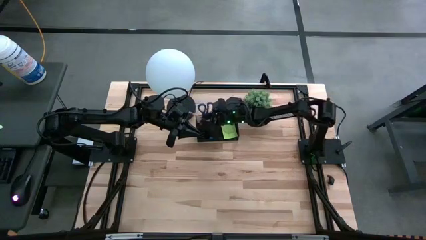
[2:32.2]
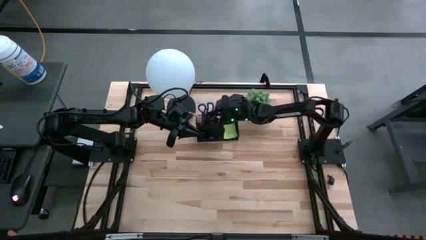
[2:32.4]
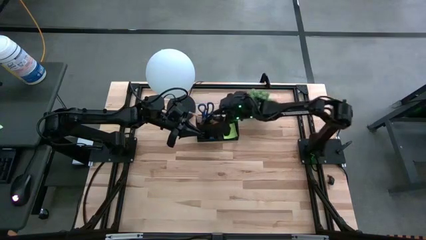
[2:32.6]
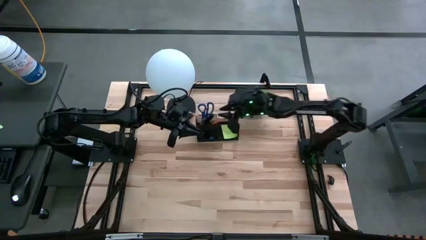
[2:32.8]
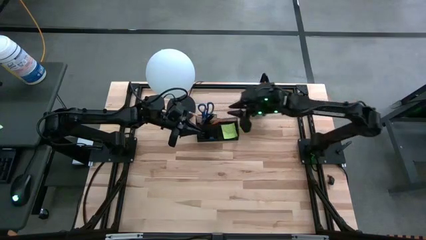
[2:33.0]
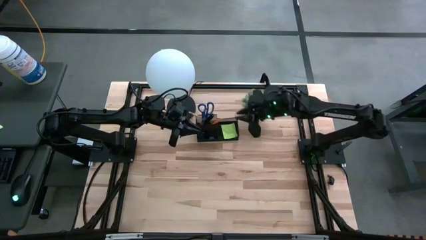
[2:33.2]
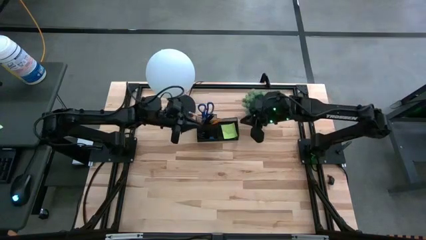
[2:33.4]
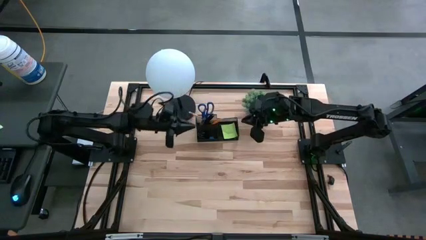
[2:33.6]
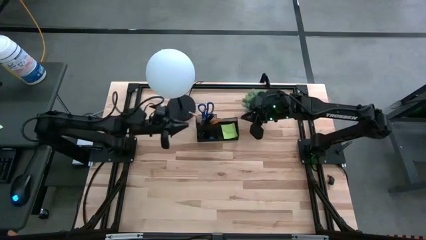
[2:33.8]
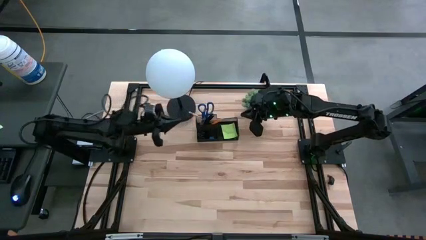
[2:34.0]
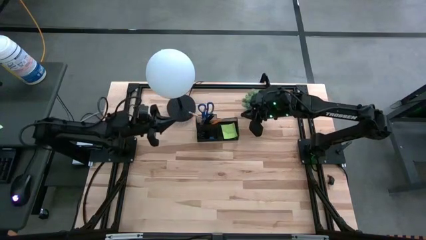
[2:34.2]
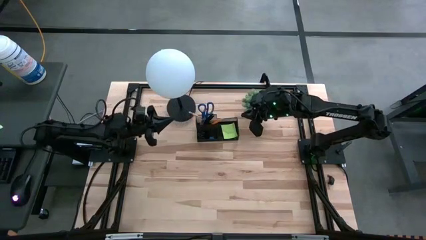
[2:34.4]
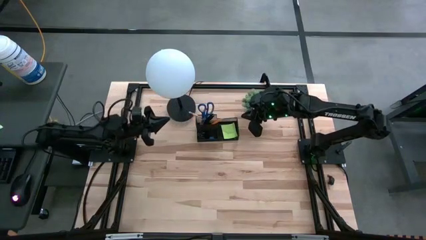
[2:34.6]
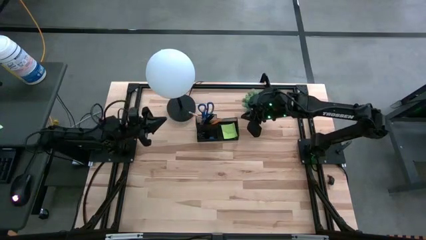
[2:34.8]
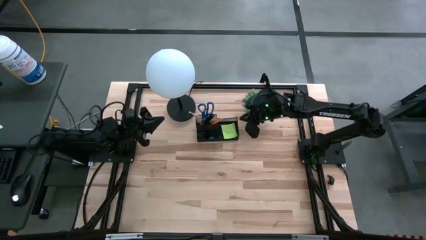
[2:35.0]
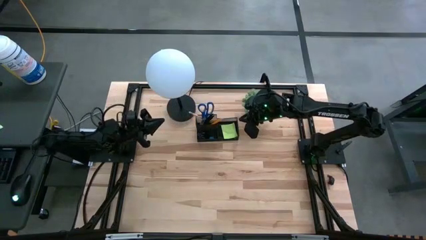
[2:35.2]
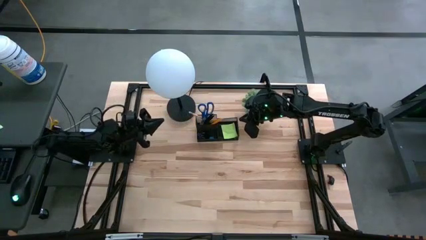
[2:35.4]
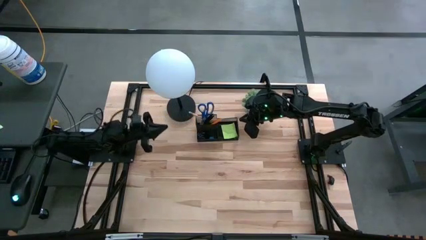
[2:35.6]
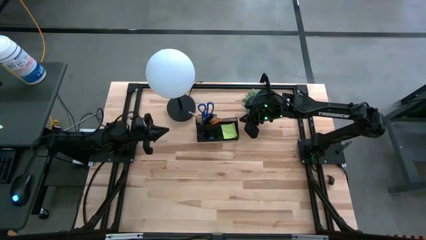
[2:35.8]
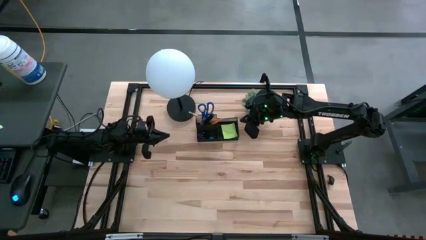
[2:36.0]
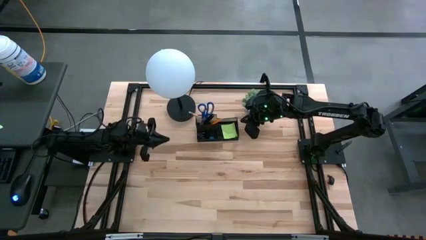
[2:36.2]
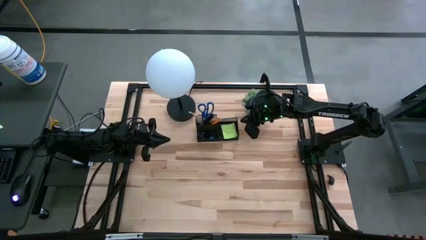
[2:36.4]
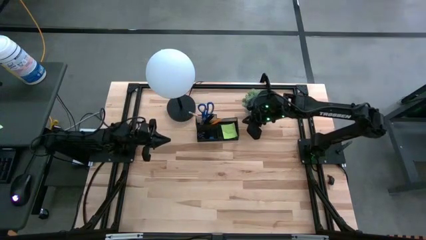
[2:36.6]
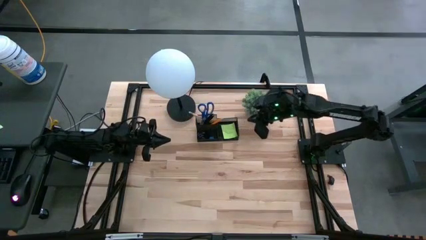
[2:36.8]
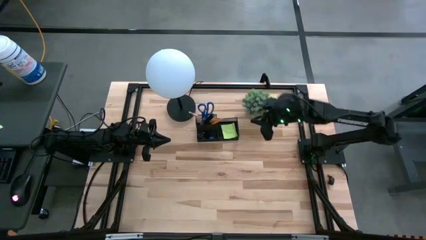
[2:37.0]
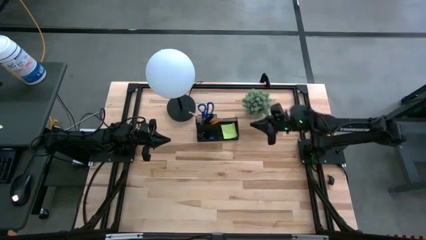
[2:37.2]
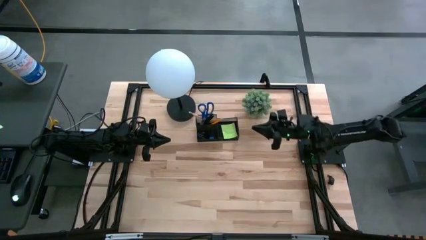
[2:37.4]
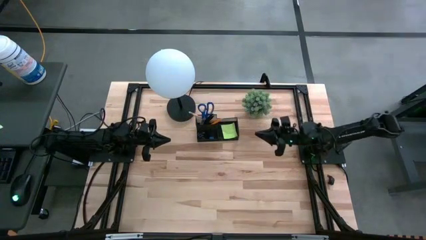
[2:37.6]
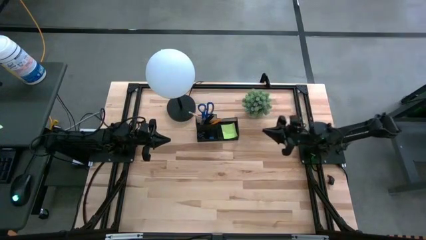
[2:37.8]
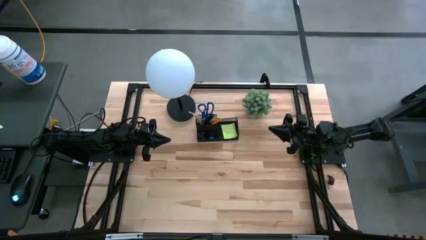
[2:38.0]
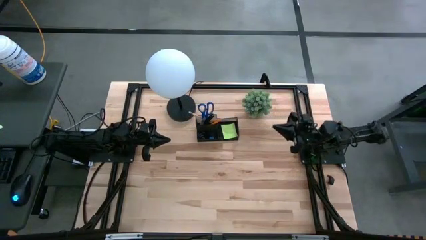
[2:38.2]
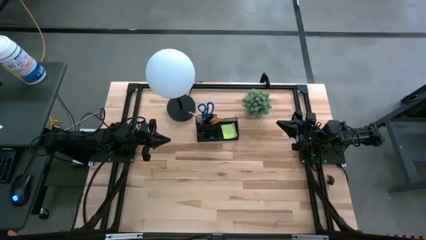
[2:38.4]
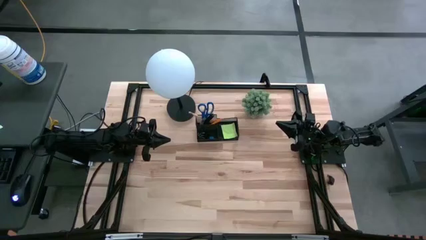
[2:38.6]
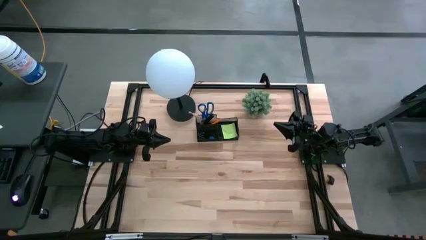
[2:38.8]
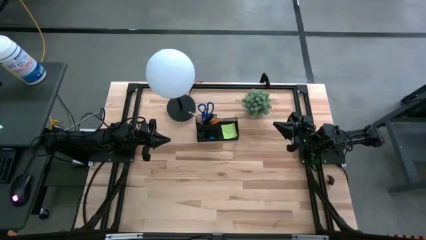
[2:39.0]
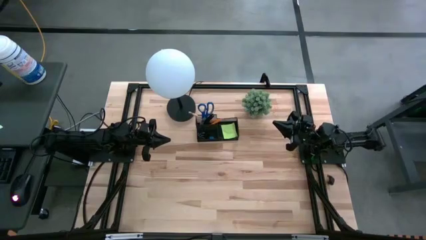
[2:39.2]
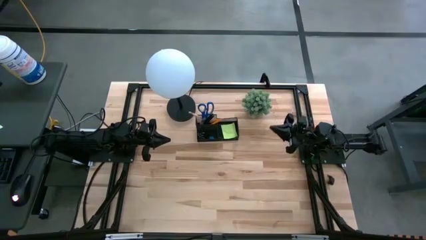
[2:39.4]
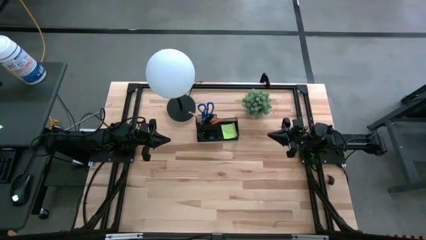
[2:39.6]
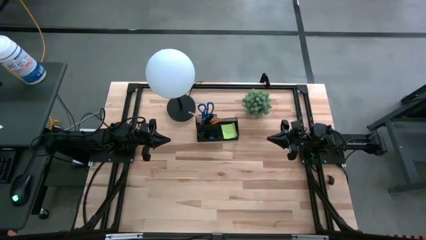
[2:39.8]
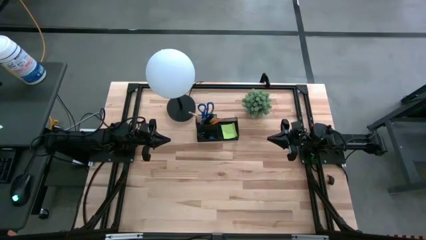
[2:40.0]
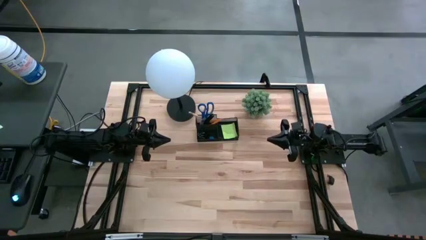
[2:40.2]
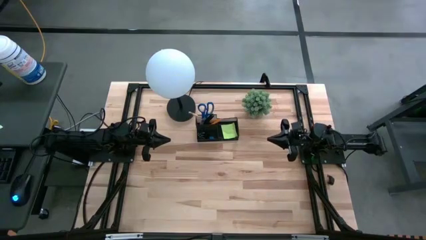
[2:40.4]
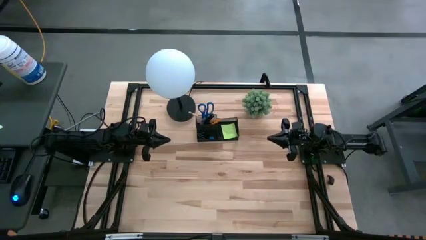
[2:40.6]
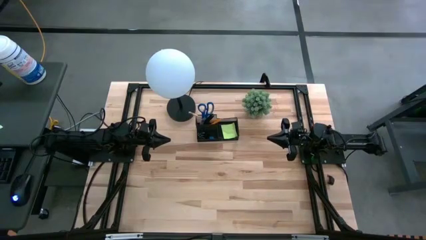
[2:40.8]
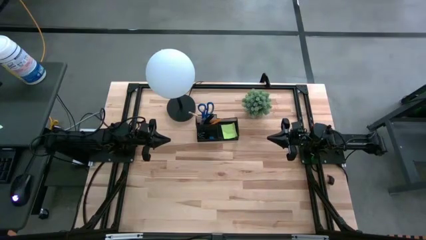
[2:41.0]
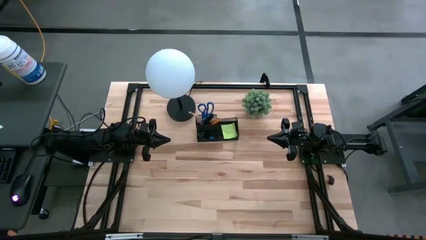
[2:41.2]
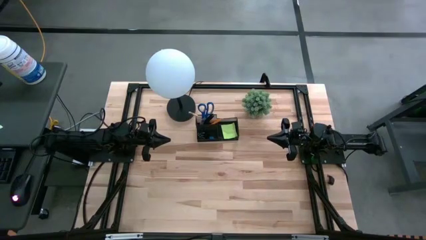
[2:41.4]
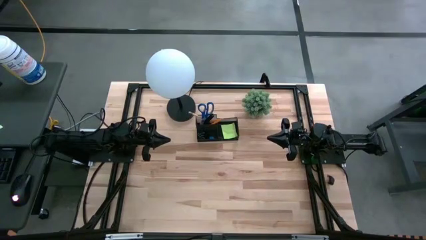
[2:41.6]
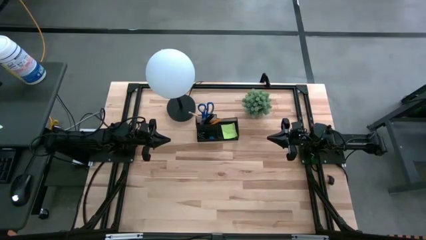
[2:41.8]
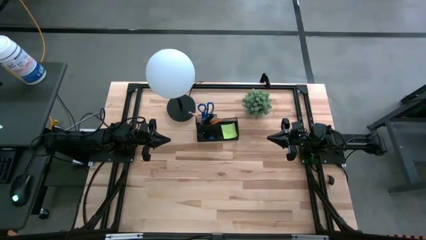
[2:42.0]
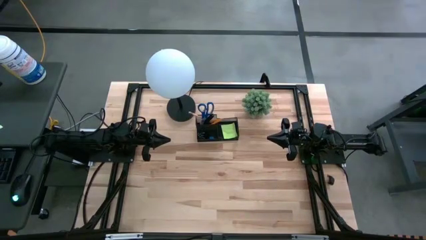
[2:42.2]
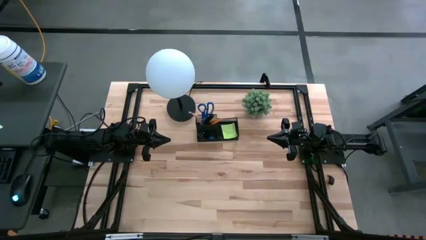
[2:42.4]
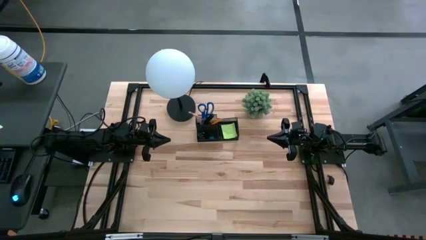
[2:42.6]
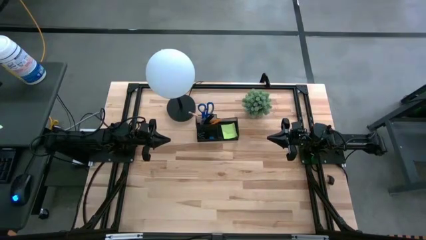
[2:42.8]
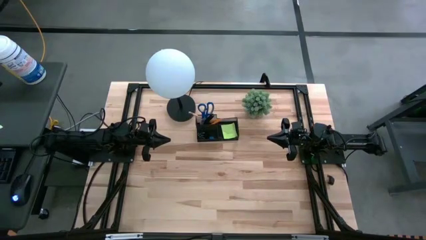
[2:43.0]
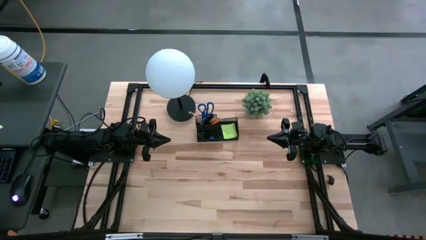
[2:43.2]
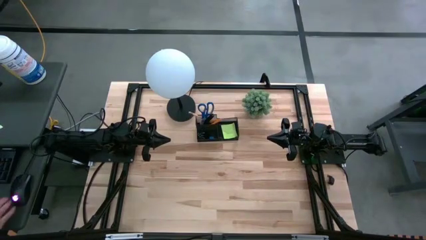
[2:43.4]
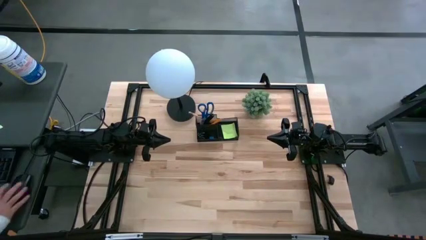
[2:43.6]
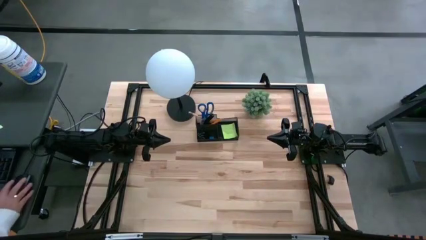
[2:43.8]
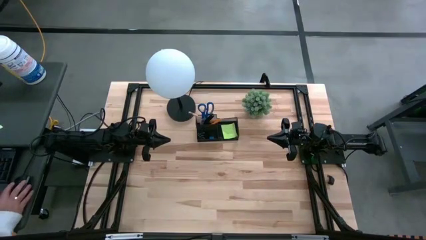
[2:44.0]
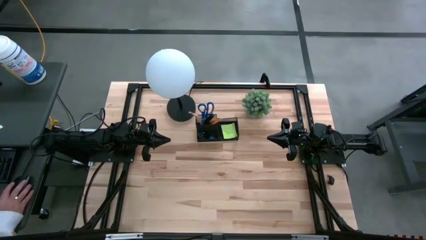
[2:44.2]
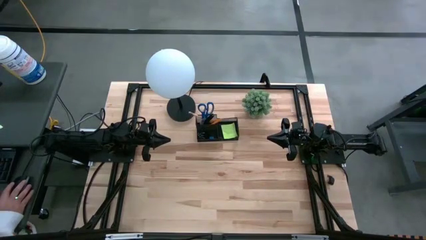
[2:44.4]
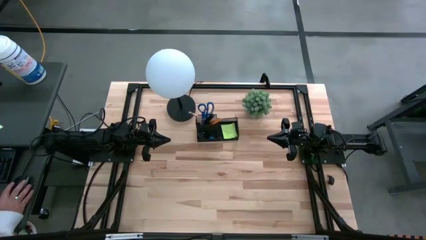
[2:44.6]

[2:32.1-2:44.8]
Task: Pick and place office supplies into organizer
Return to Home Position
